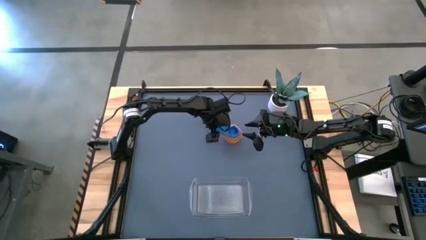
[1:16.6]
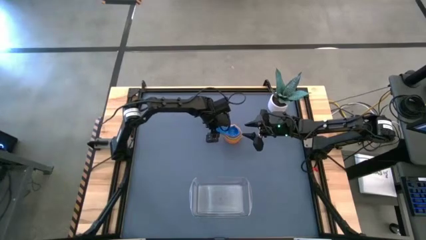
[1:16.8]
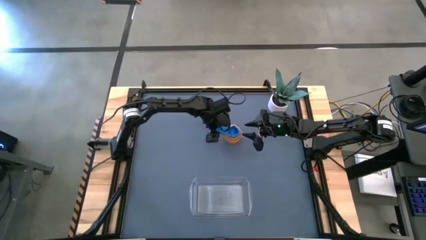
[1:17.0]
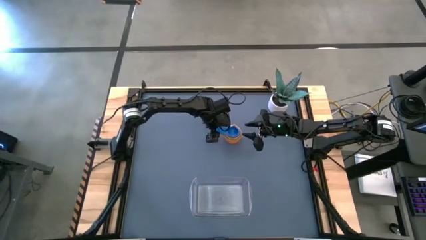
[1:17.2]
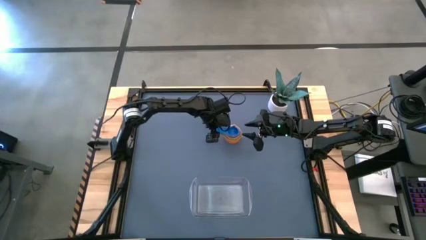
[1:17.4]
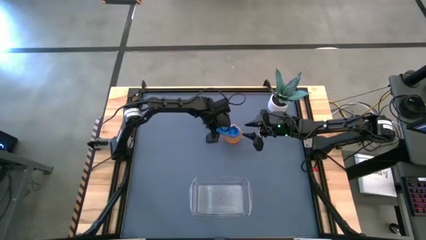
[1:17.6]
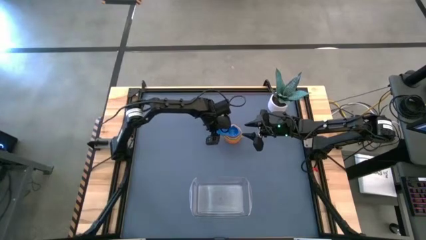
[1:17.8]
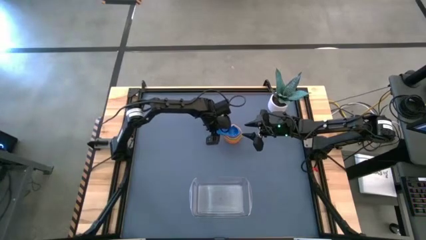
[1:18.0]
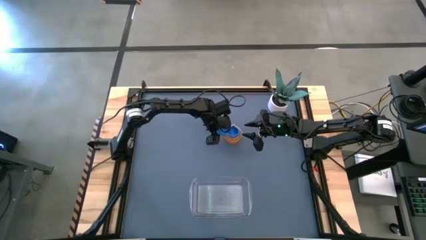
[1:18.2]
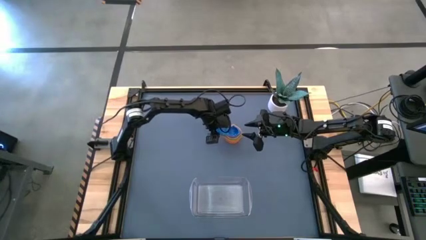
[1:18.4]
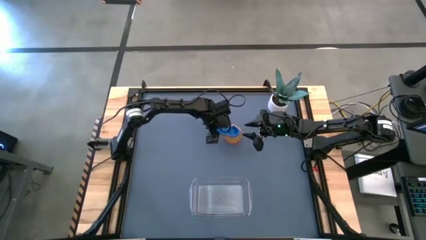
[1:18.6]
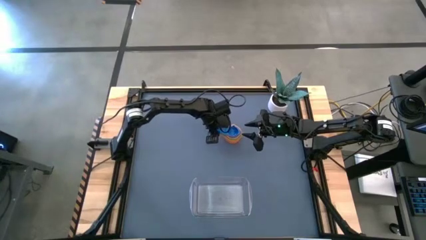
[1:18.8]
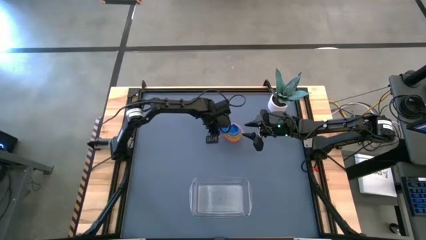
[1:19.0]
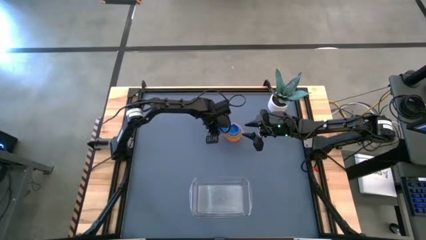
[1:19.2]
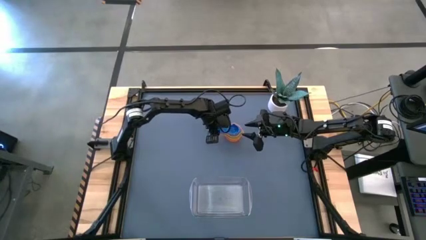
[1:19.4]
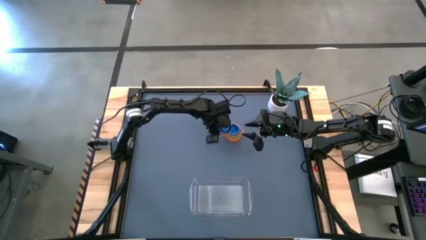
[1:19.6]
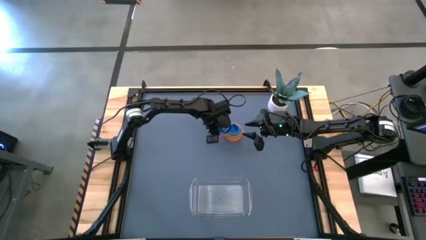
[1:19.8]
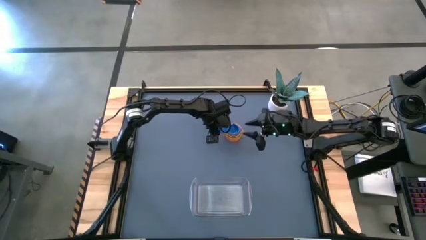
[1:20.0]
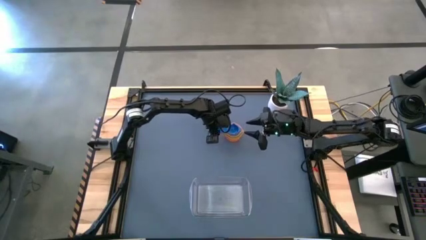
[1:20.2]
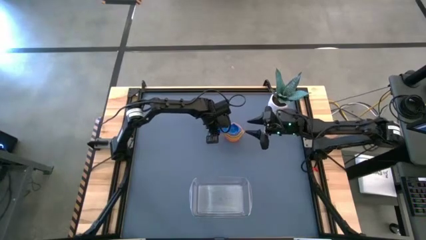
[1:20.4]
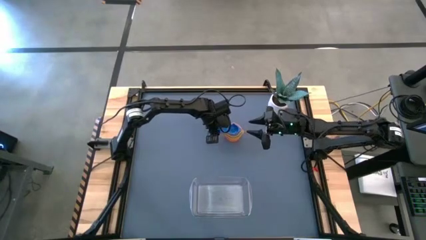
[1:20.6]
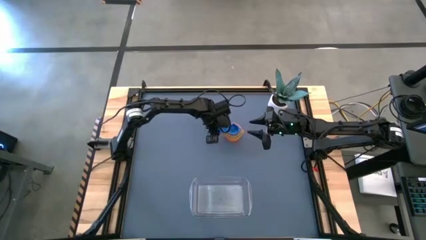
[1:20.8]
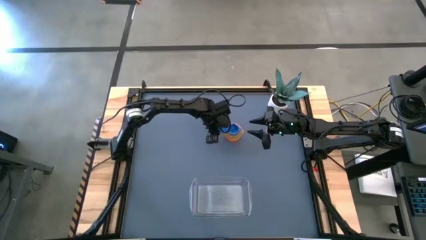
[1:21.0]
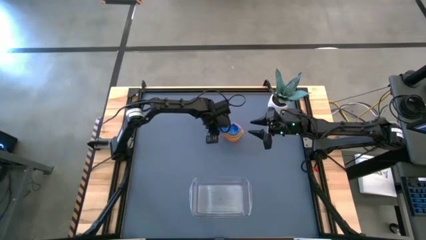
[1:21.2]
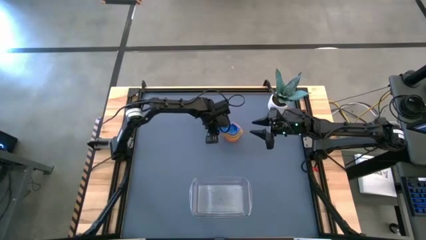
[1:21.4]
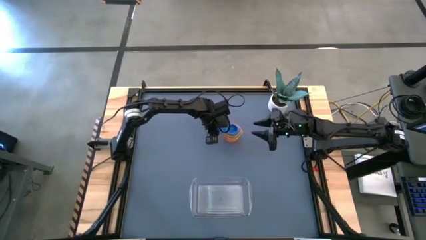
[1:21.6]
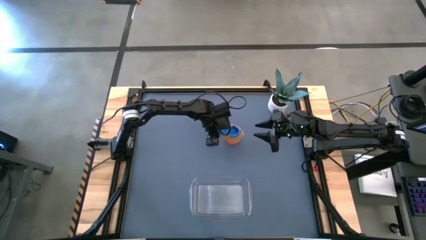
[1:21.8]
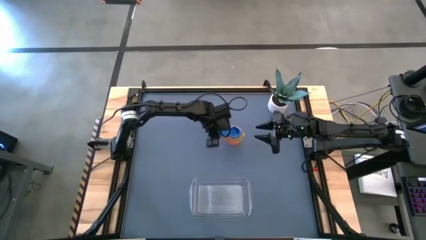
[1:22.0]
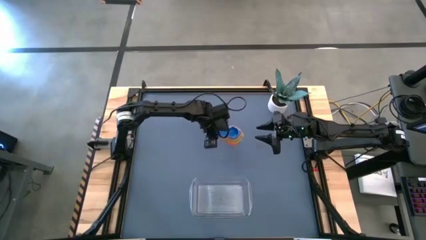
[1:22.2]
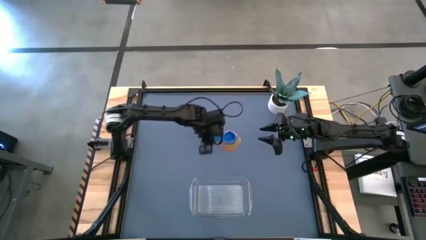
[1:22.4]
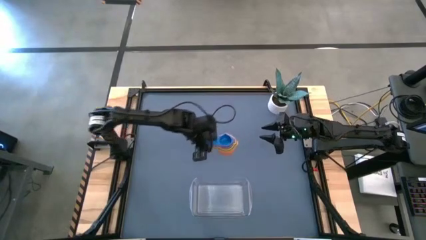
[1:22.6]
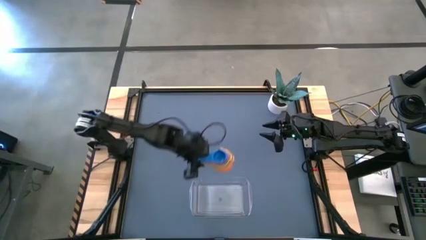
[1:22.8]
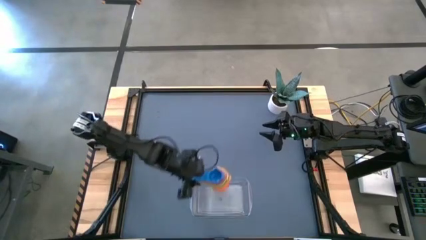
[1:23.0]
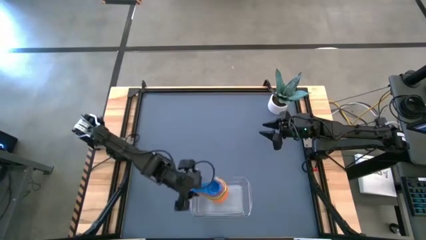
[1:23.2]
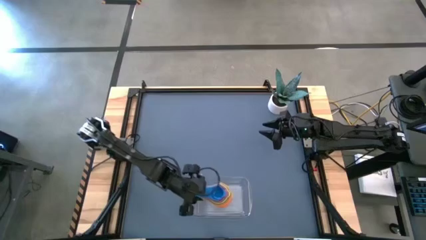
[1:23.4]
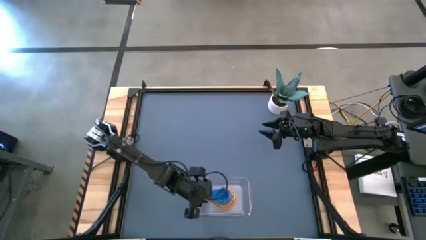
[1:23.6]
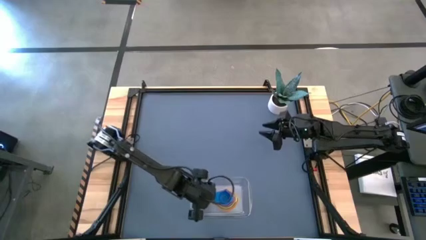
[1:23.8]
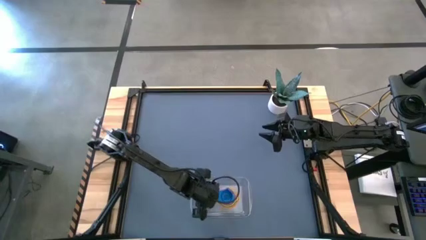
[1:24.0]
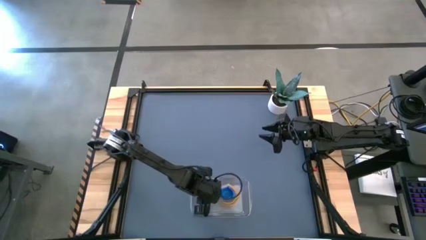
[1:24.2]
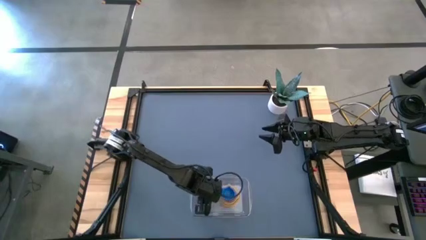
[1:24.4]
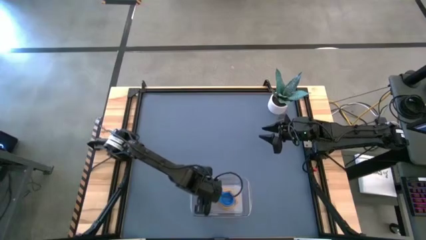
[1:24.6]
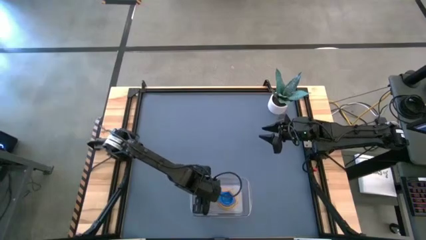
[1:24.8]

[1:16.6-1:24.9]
Task: Nest measuring cups in basket
Put the stacked measuring cups into the transparent bin
